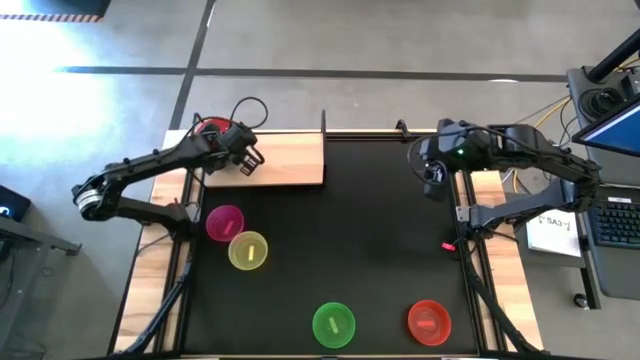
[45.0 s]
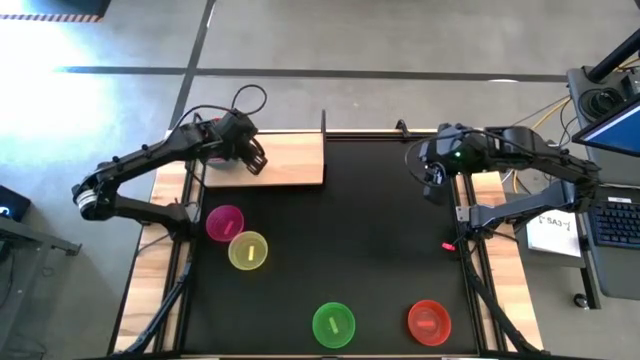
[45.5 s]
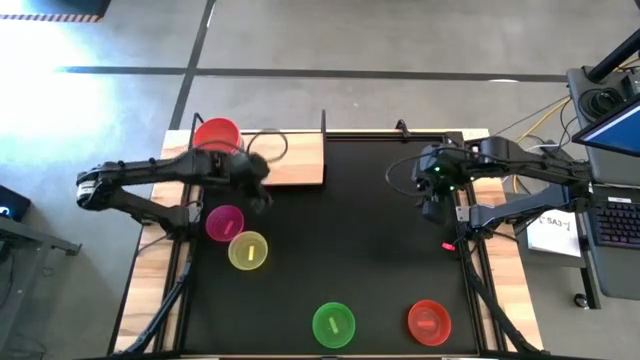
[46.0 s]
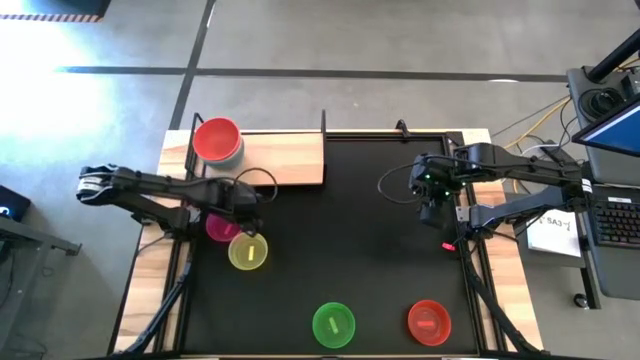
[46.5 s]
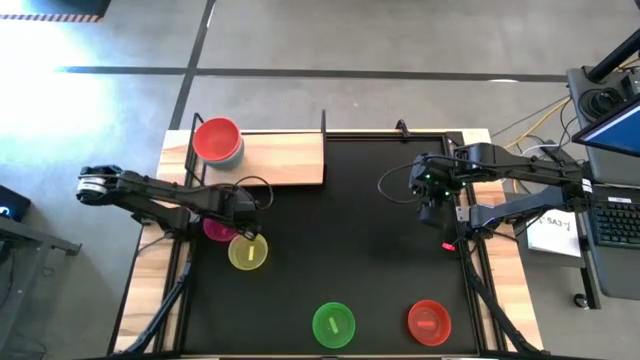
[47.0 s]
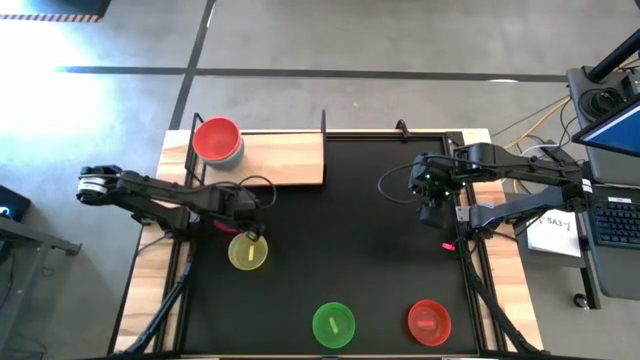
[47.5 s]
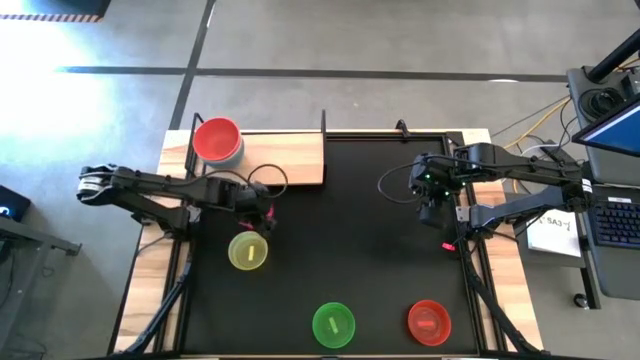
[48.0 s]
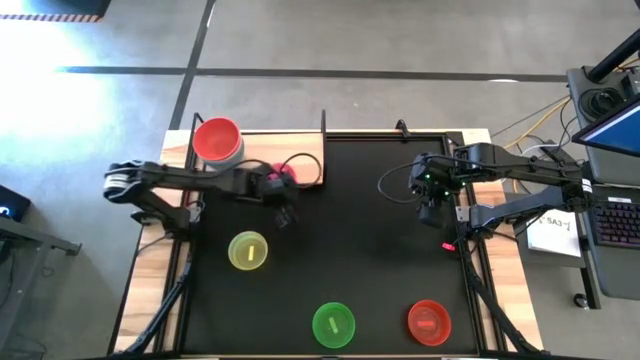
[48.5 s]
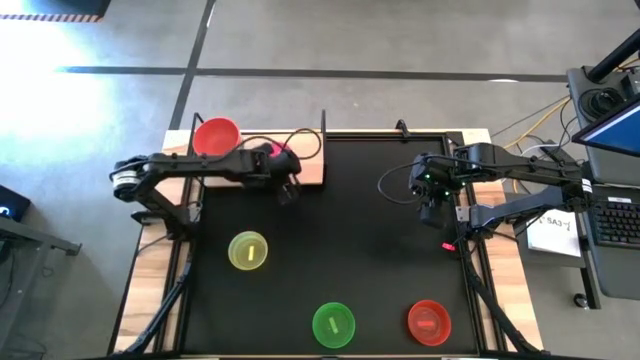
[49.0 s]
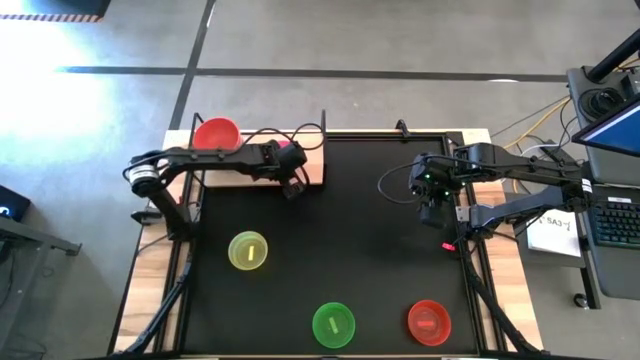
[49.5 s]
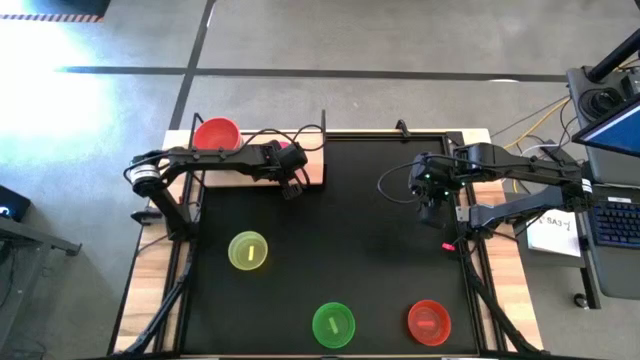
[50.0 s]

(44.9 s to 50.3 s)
Task: Place and stack bowls onto a shelf
Put the pink transparent bowl on the shelf

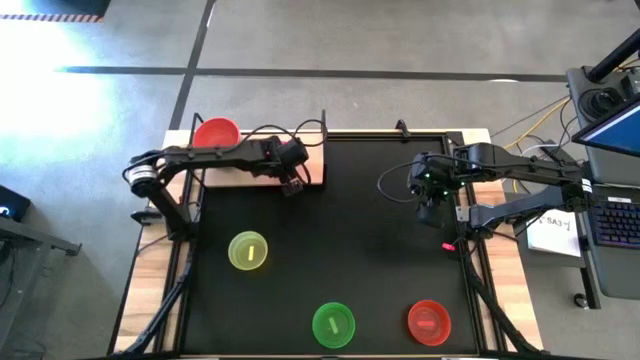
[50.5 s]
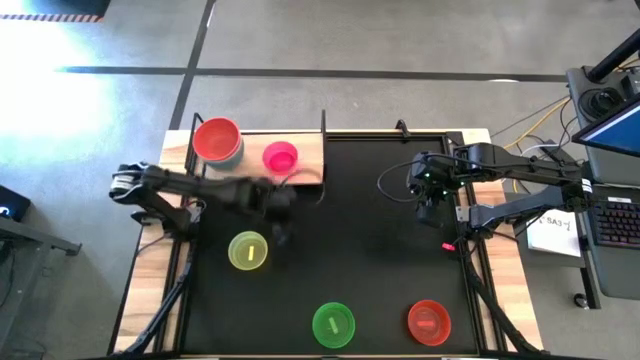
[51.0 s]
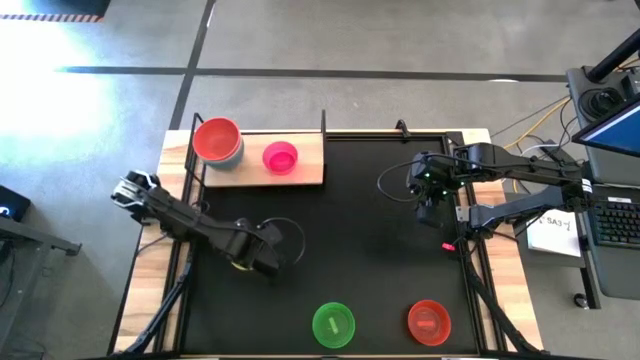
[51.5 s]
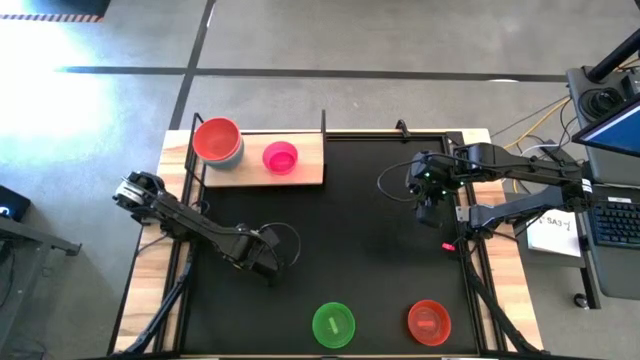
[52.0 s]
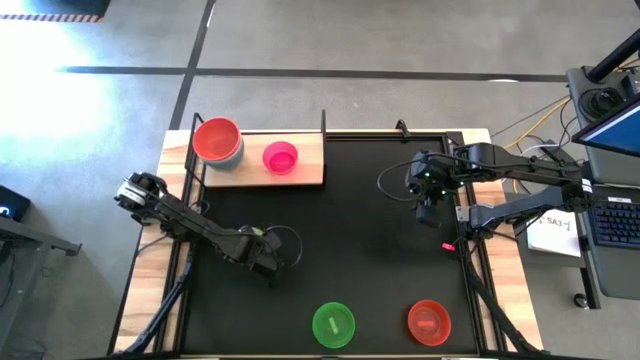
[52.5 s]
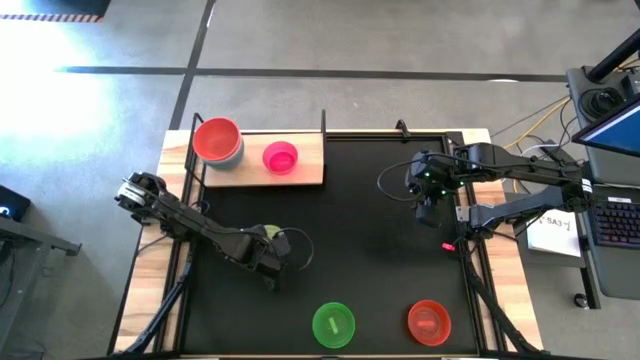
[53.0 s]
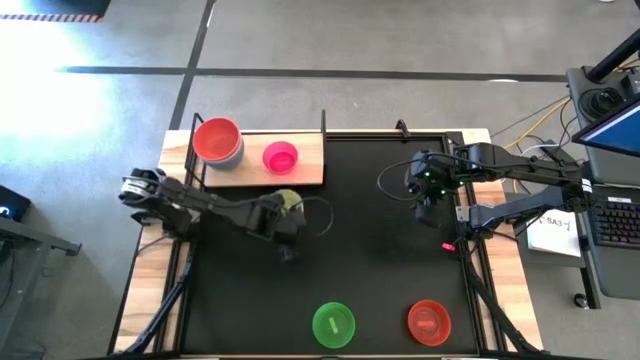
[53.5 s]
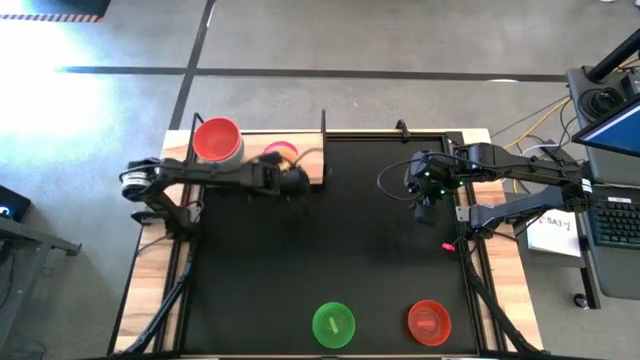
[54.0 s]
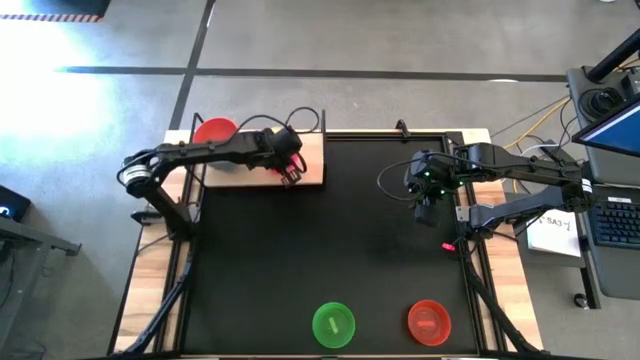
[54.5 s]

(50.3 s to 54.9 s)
Stack the yellow transparent bowl on the pink transparent bowl on the shelf

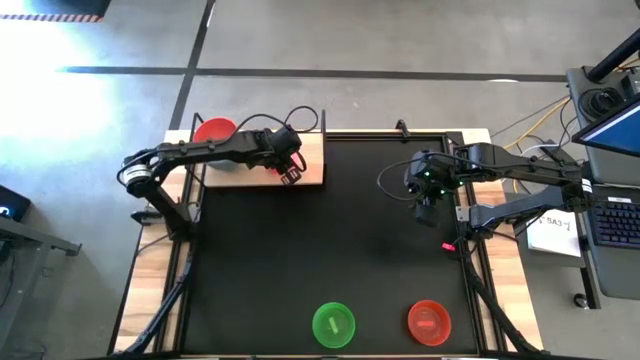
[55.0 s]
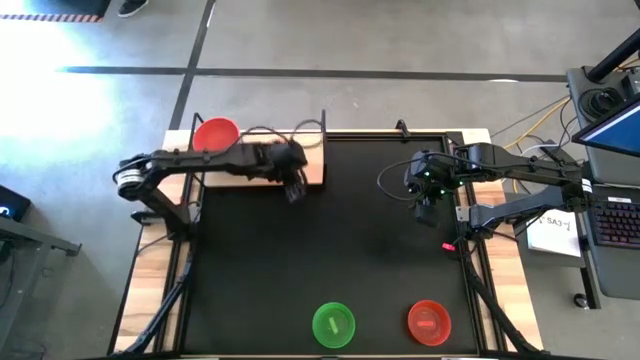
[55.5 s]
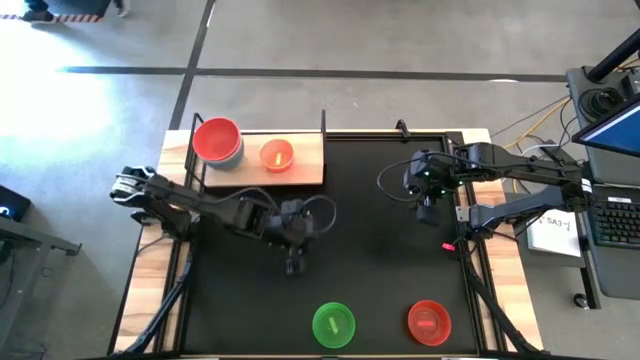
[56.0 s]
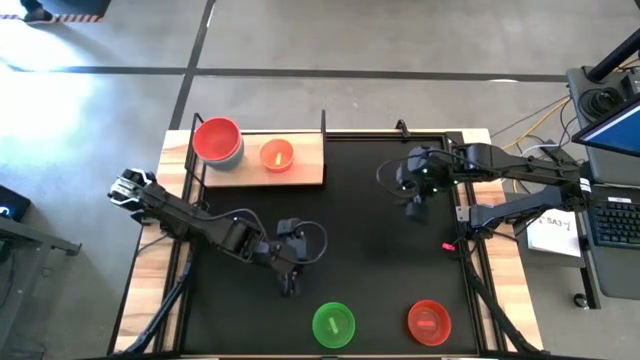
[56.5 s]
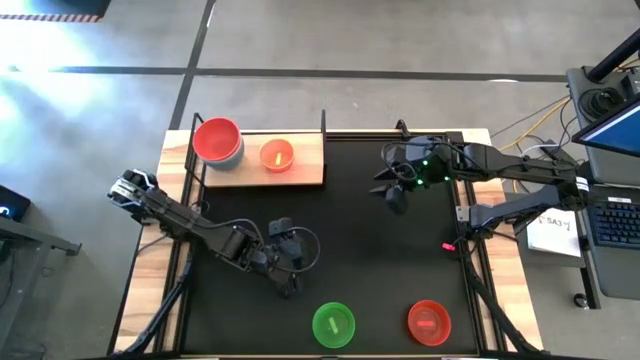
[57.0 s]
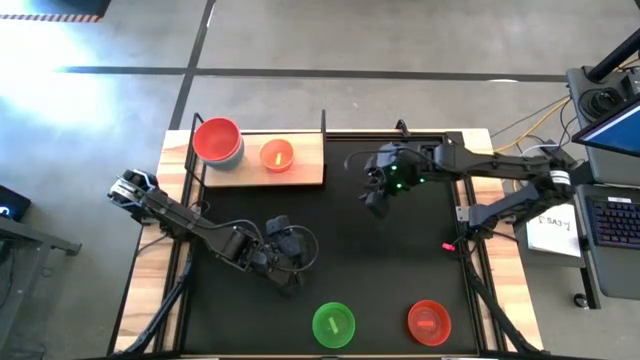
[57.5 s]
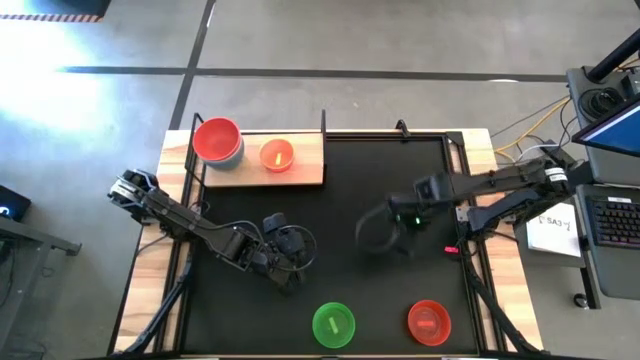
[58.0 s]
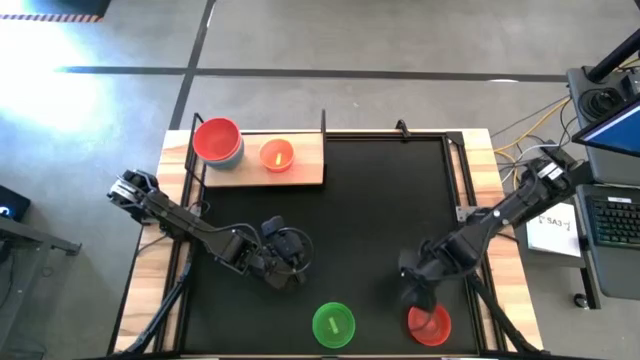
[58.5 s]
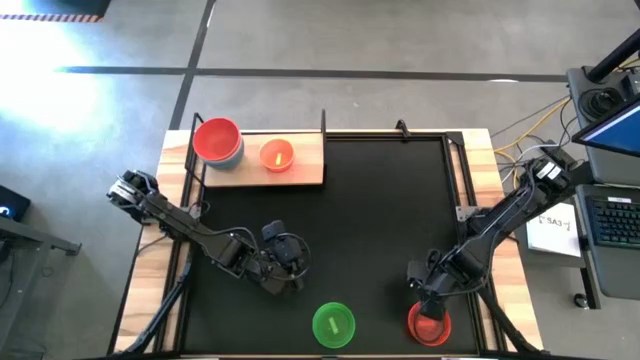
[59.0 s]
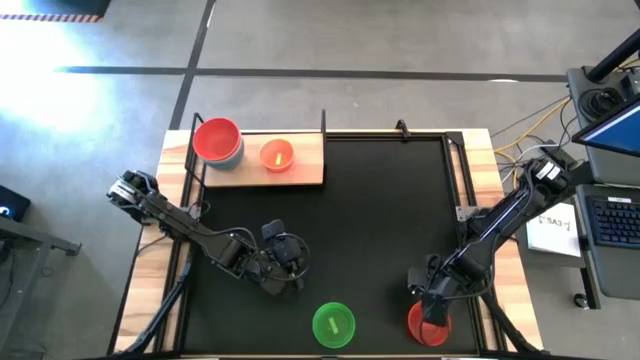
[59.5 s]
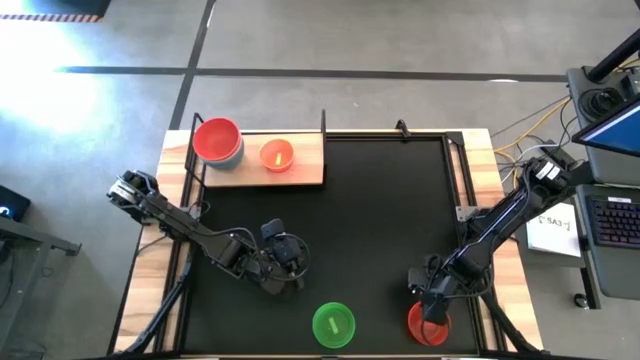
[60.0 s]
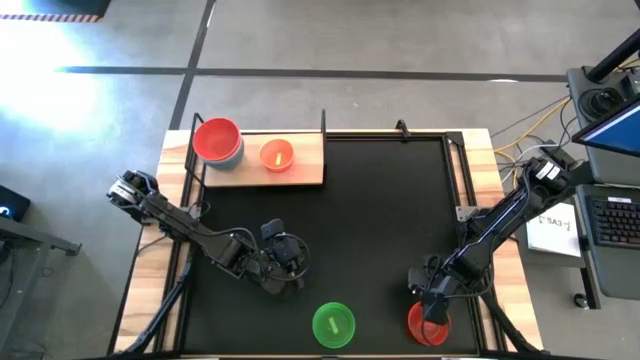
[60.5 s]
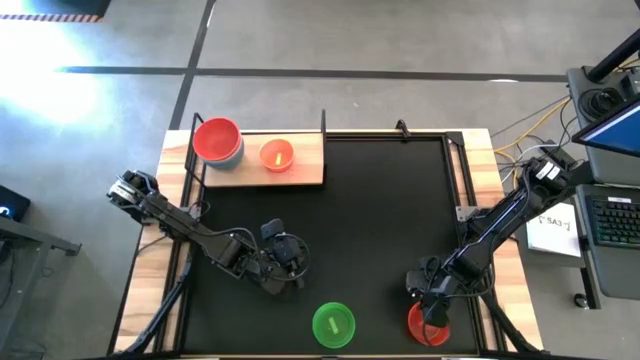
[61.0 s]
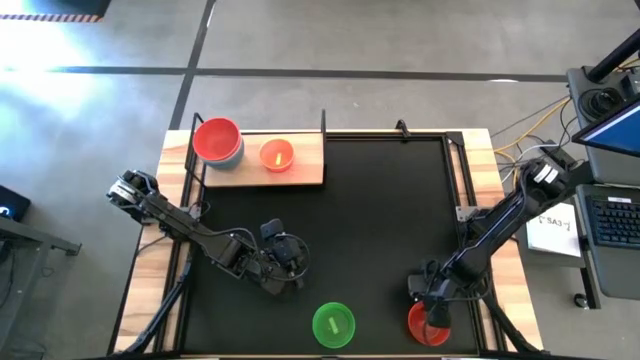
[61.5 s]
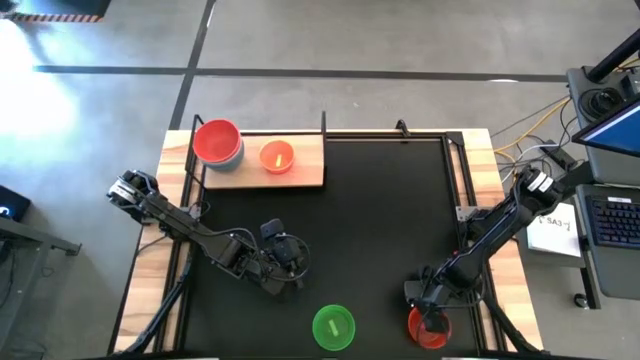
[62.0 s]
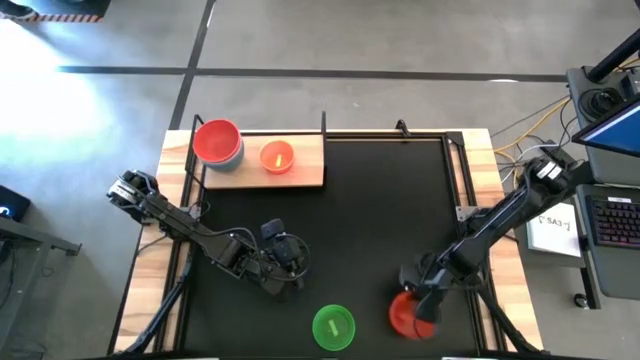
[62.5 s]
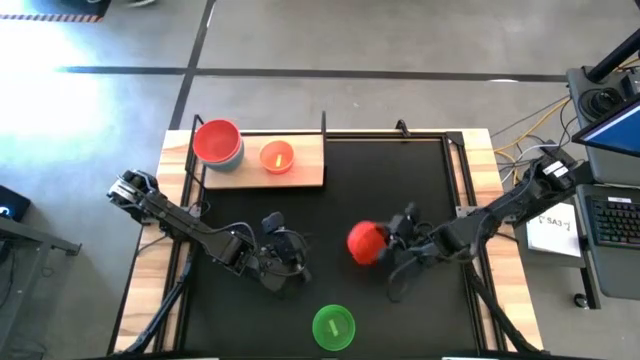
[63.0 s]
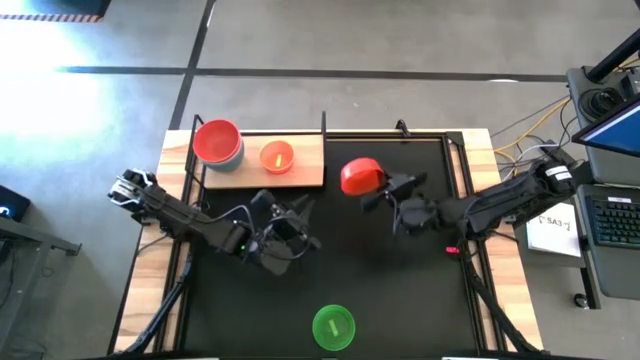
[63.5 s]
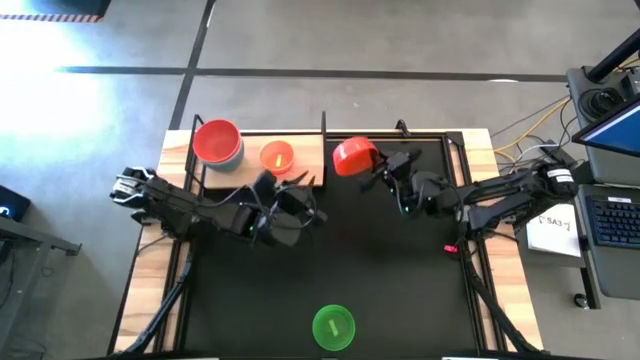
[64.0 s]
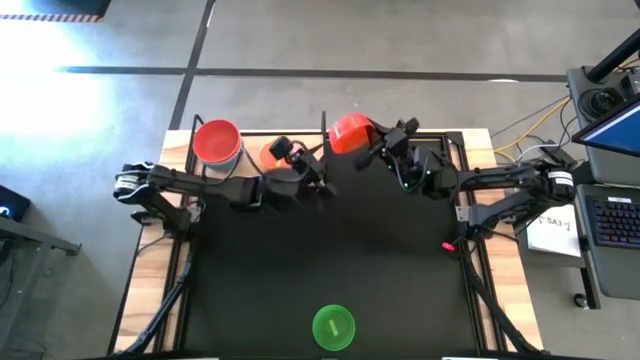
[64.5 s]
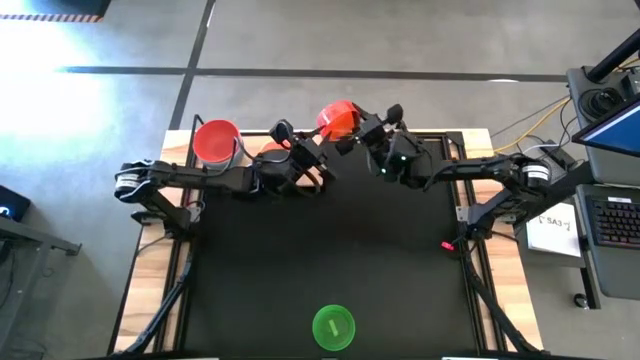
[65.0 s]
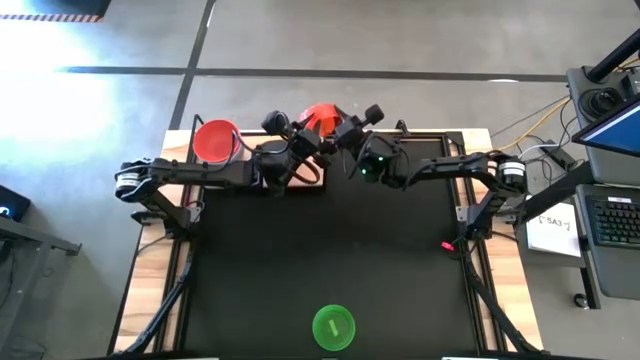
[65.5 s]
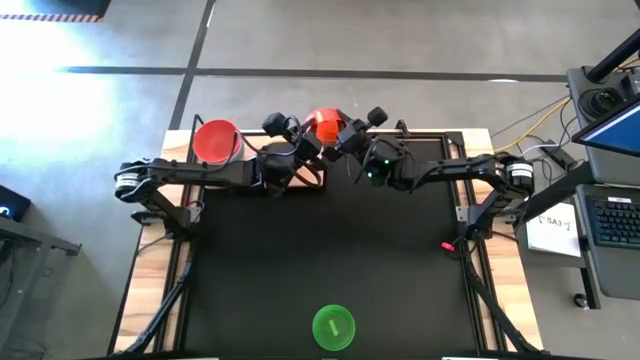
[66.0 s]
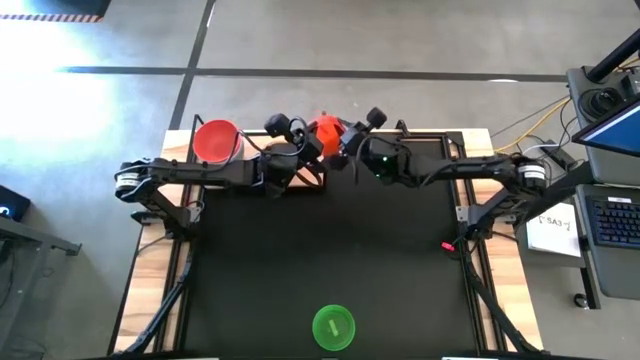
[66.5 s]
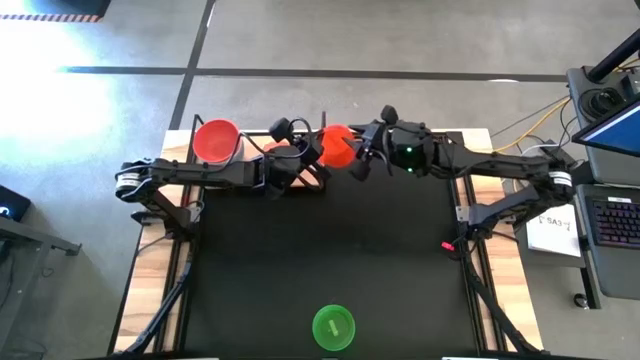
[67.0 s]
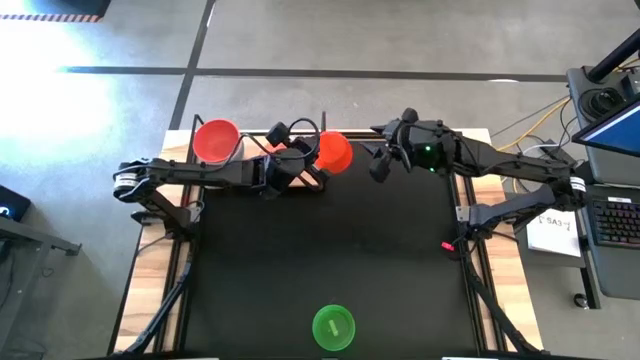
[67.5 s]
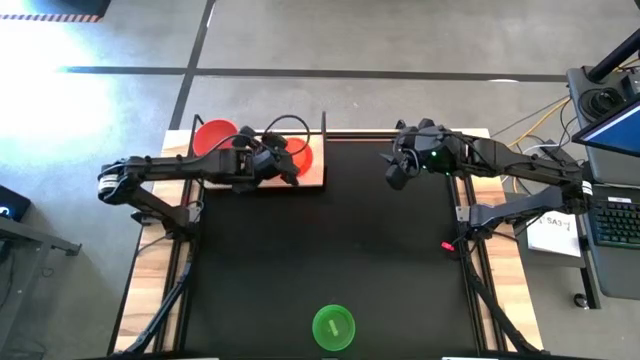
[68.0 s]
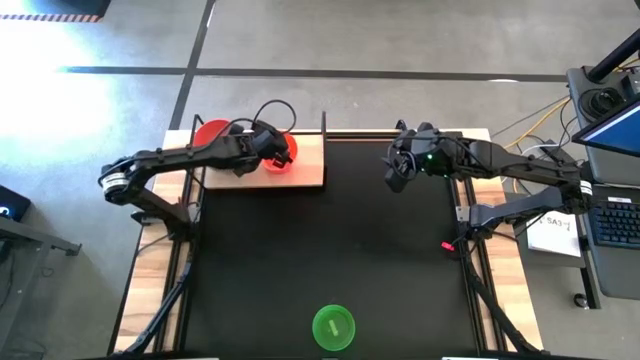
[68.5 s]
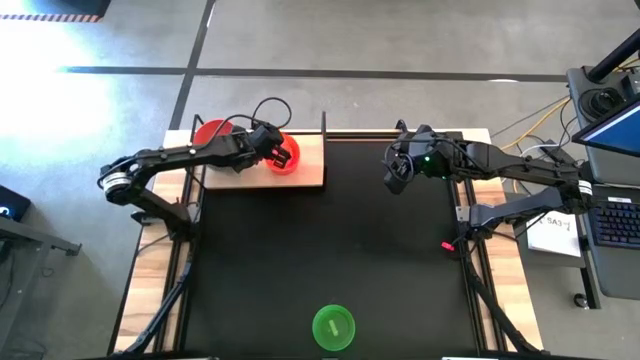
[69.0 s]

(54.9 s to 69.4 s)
Stack the orange transparent bowl on the yellow transparent bowl on the shelf
